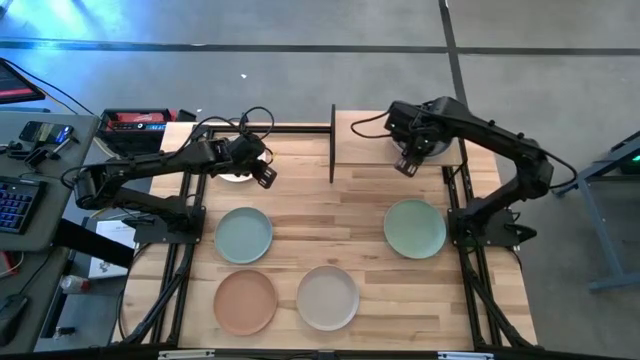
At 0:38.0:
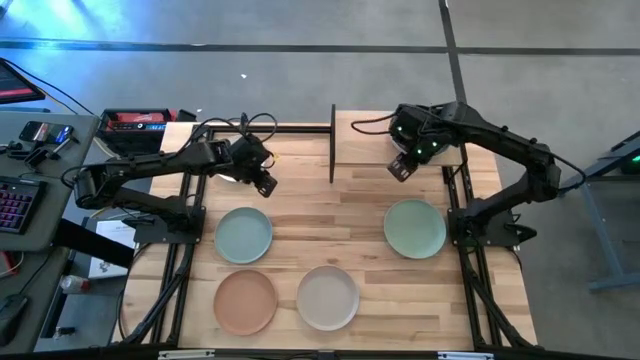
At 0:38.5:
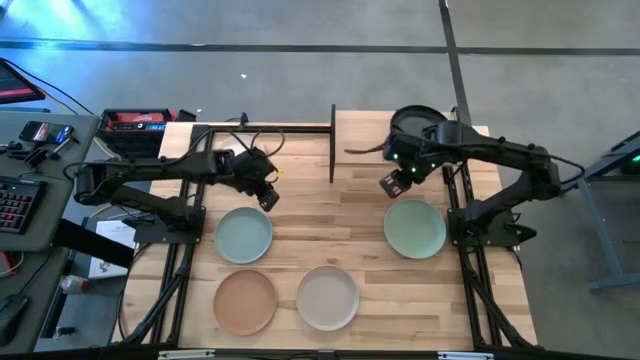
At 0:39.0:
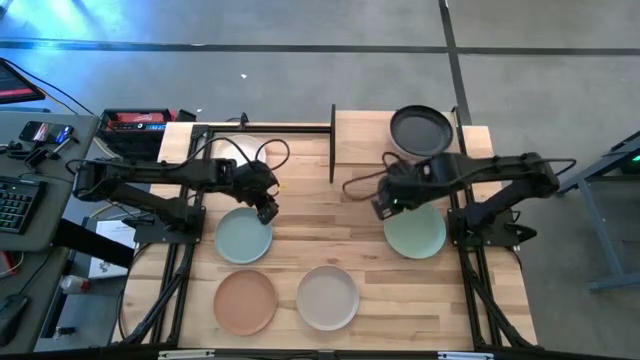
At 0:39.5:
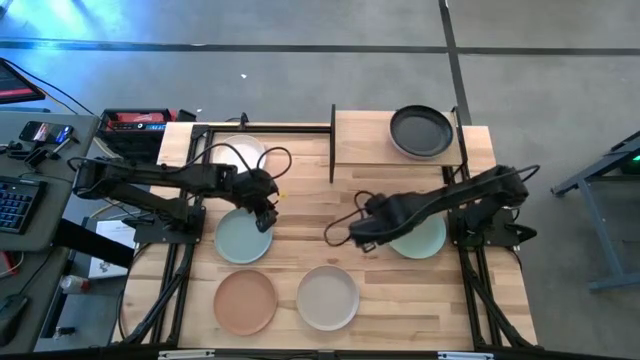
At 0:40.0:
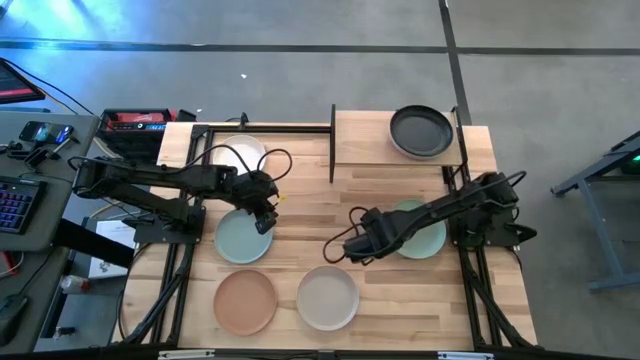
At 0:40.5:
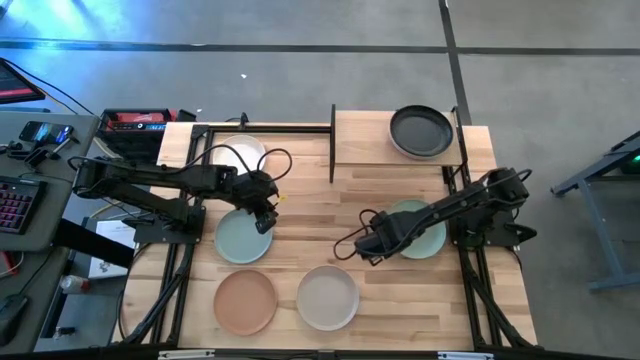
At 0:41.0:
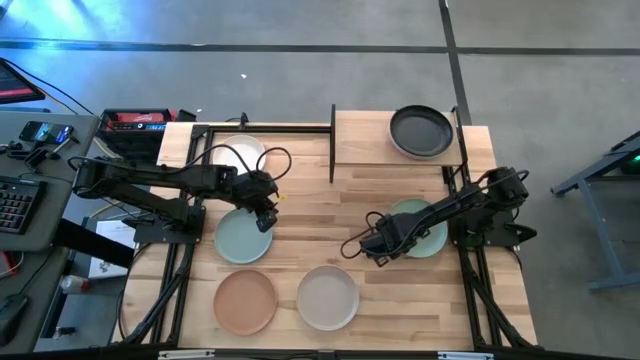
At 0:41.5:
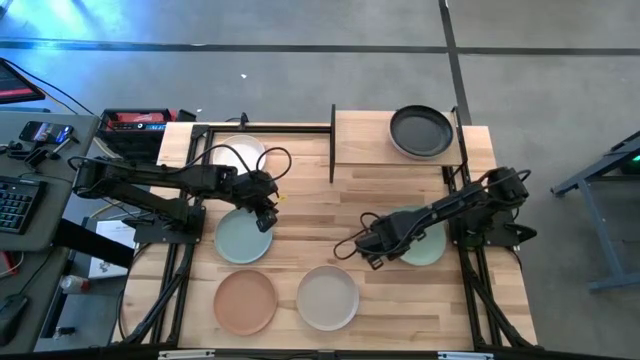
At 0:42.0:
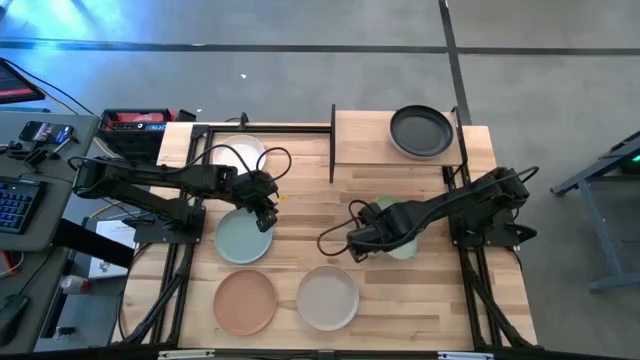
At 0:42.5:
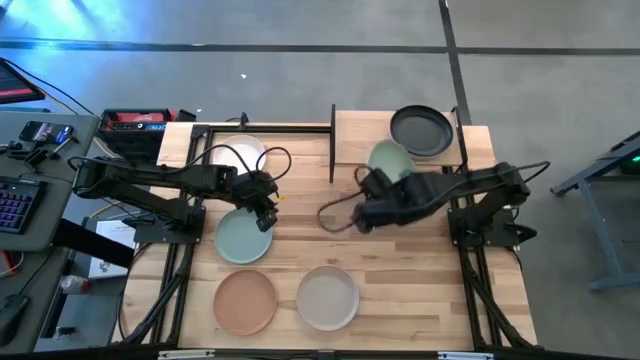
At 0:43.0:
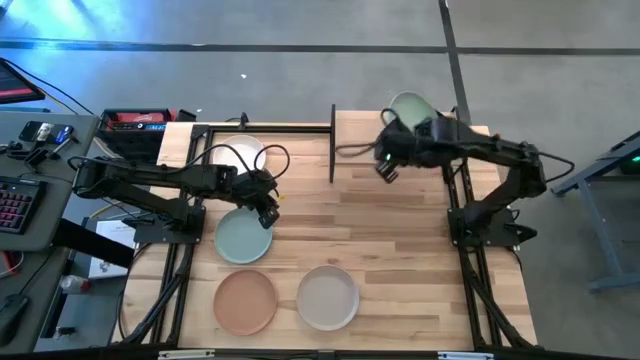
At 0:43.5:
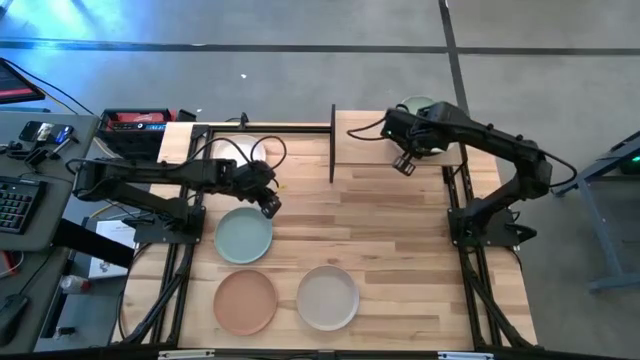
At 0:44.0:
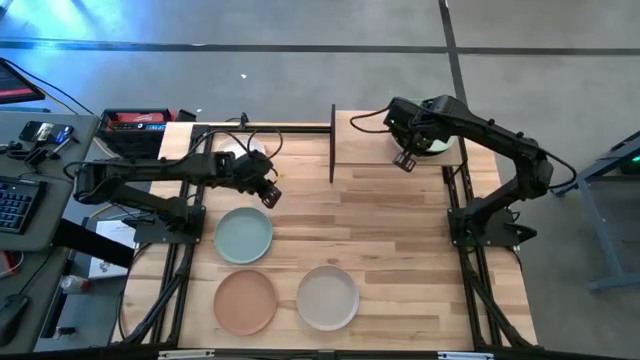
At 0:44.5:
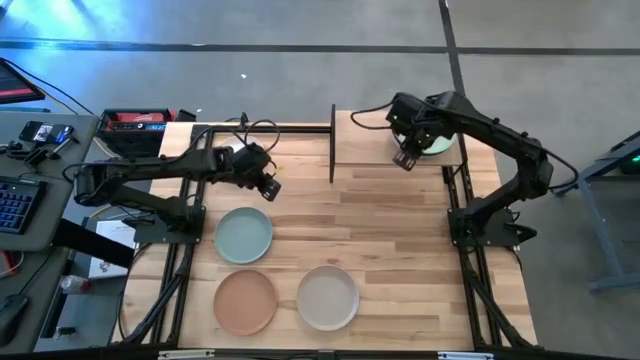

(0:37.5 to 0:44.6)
Task: Place and stack plates onto a shelf
Stack the green plate on top of the black plate on the shelf

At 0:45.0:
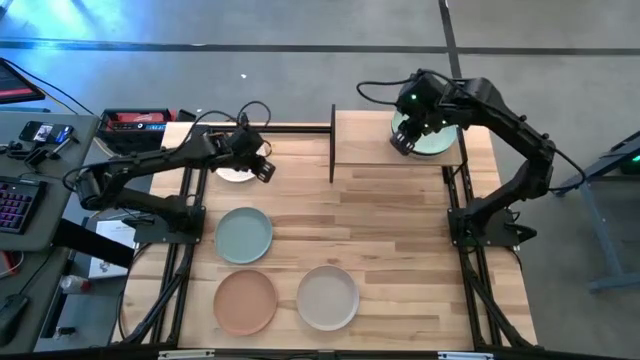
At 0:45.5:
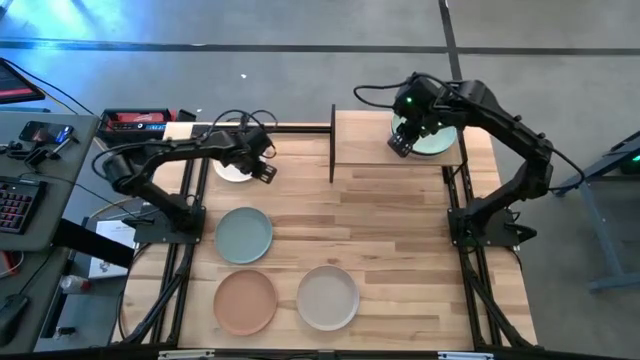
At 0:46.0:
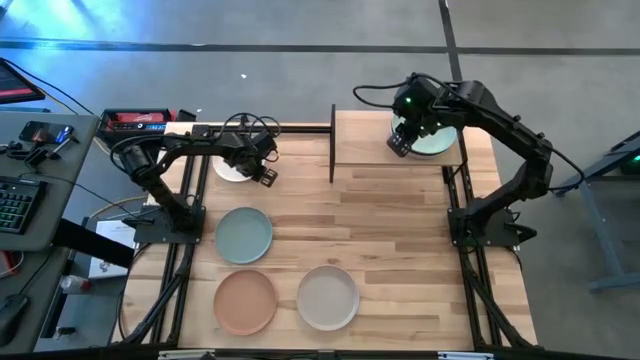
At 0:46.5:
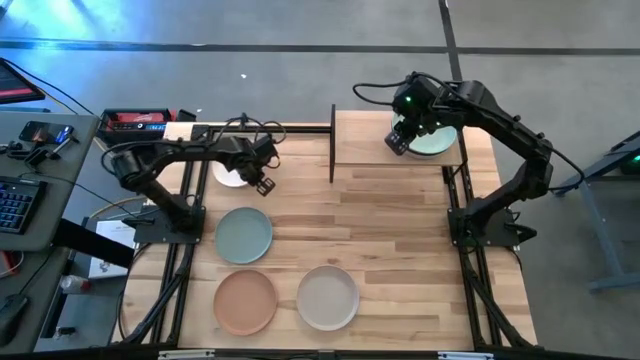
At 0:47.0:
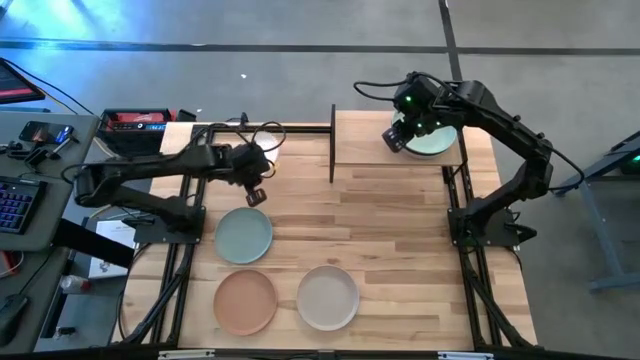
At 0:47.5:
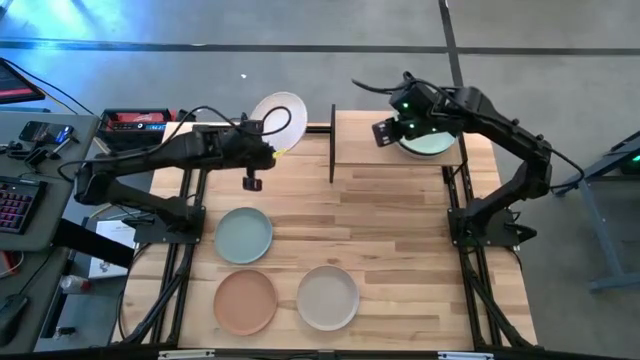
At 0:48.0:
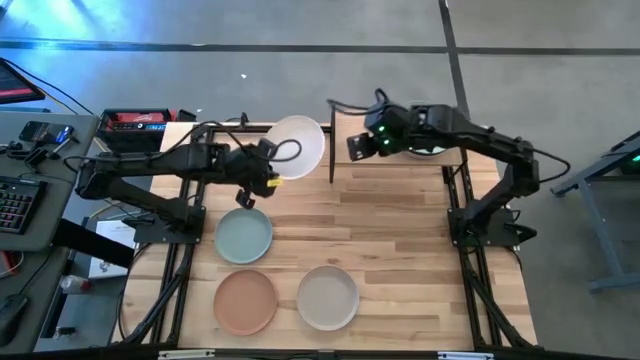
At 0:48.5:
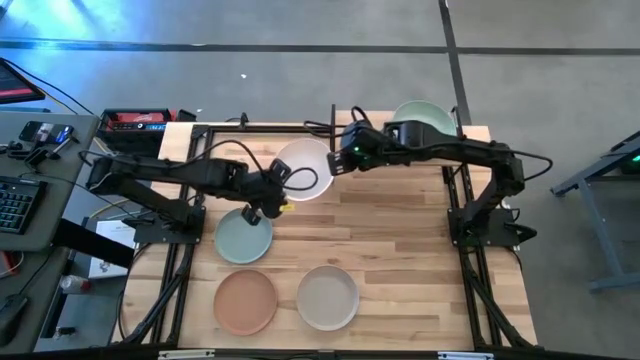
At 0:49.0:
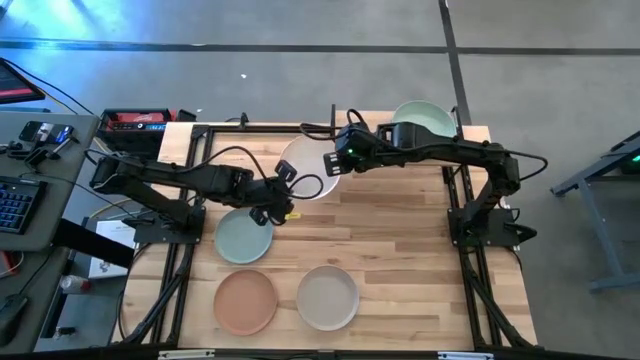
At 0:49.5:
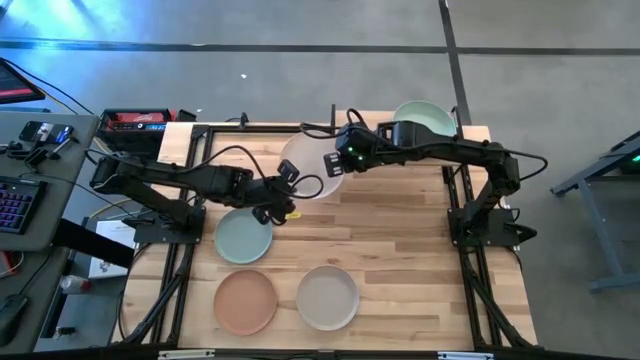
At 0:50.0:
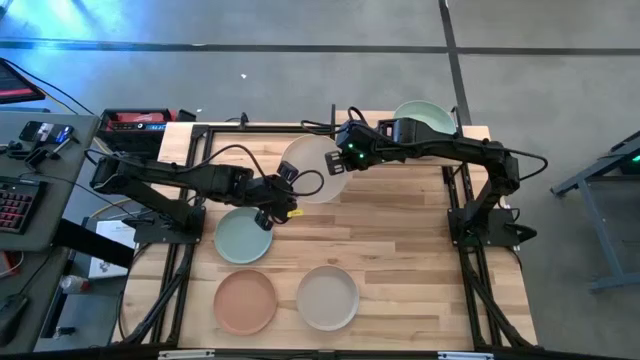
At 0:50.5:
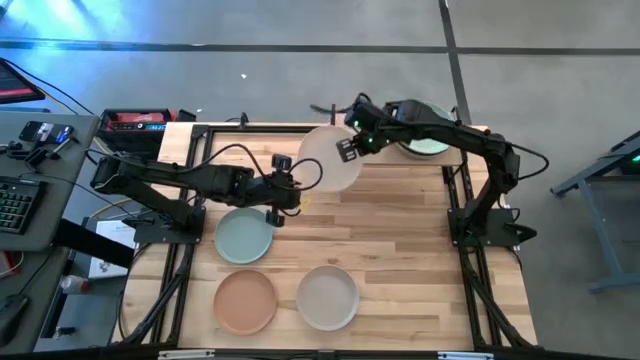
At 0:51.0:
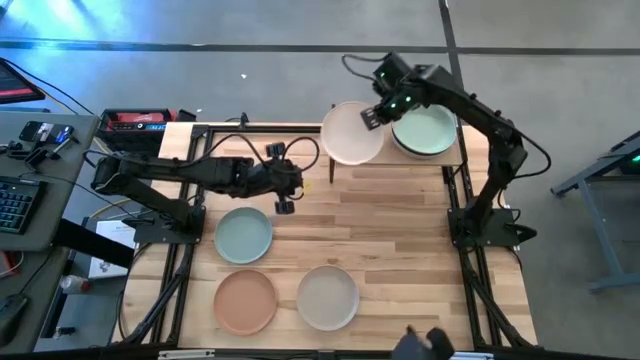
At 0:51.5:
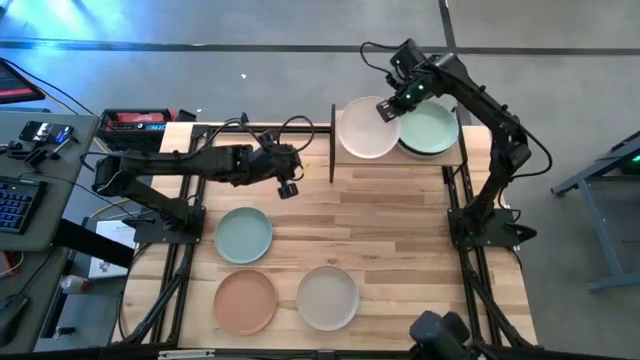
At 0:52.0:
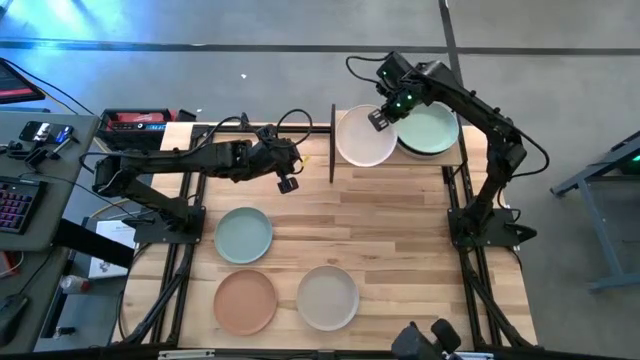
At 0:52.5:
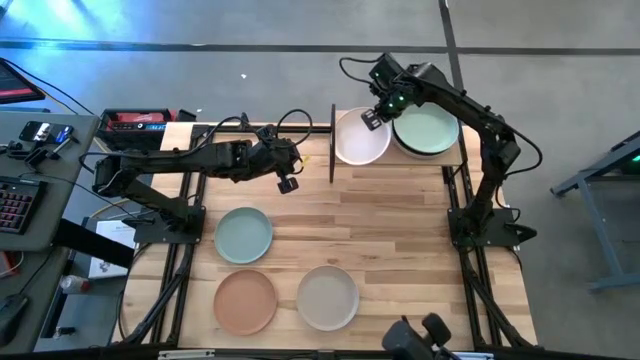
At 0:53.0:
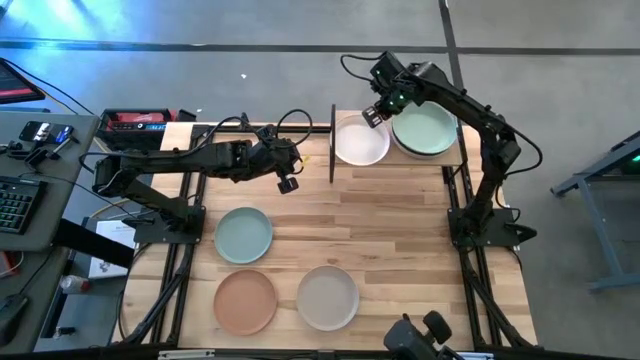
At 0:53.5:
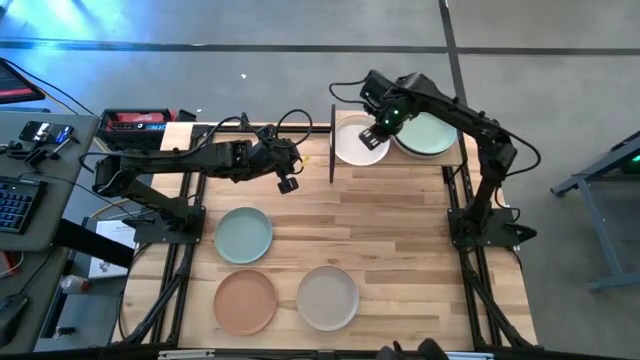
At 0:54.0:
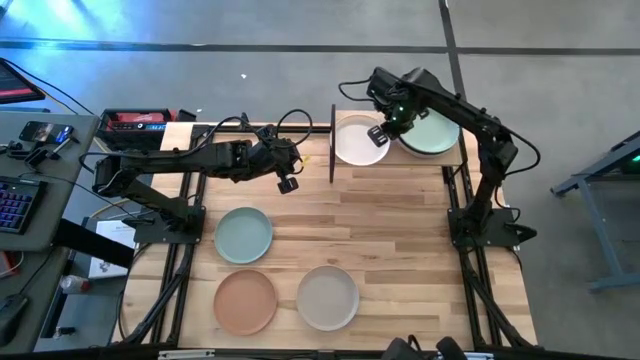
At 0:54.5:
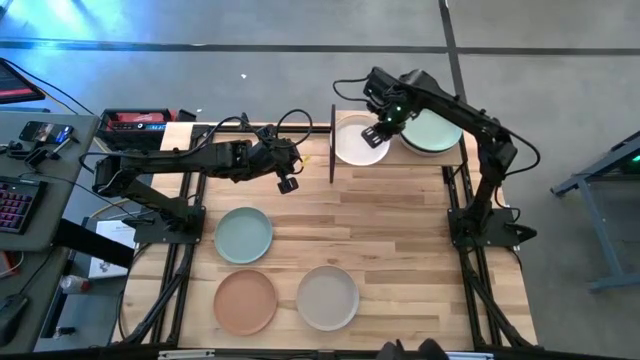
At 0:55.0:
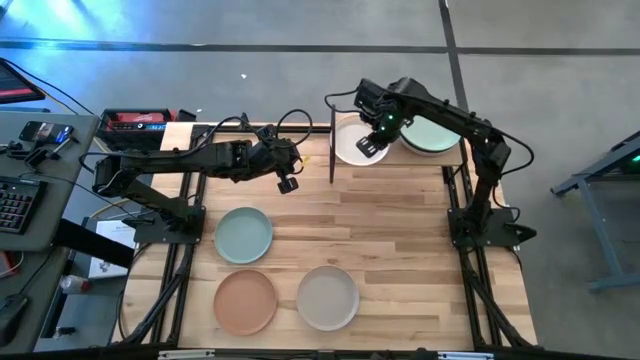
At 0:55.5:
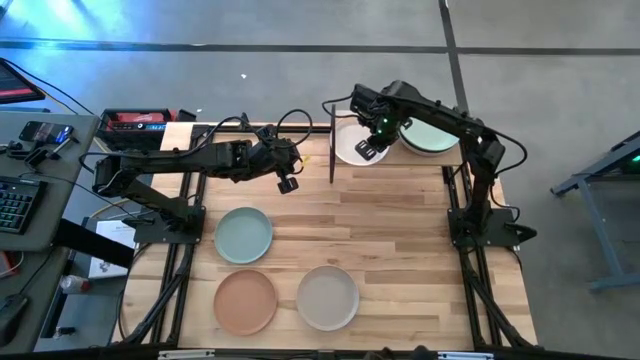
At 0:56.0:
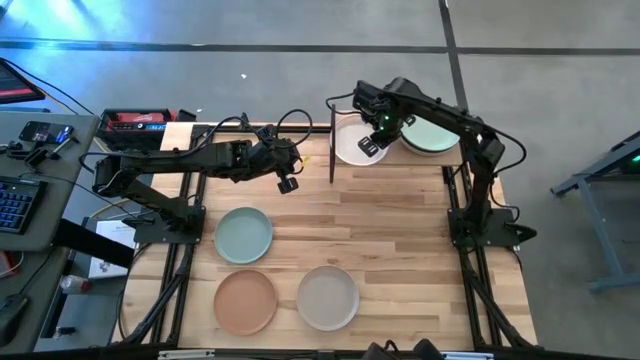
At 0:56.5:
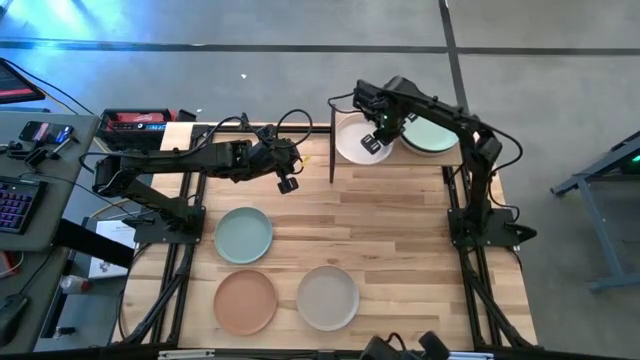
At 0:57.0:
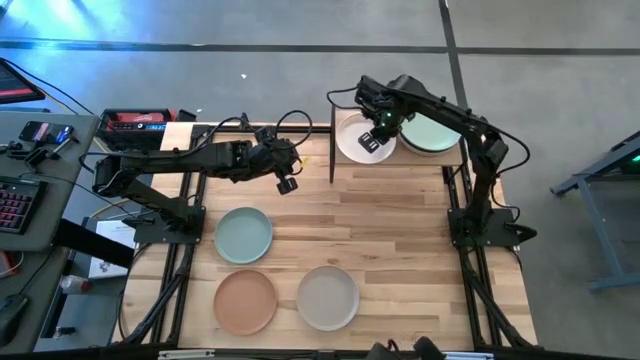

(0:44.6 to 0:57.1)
Put the white plate on the shelf

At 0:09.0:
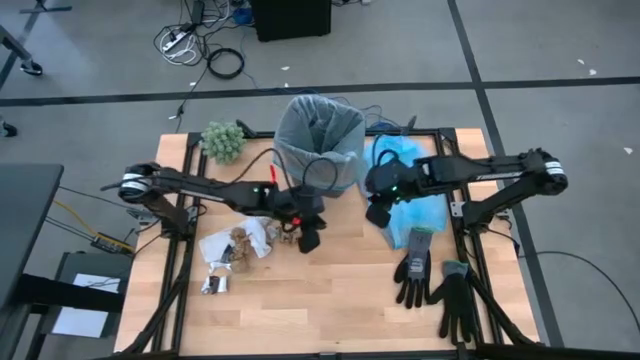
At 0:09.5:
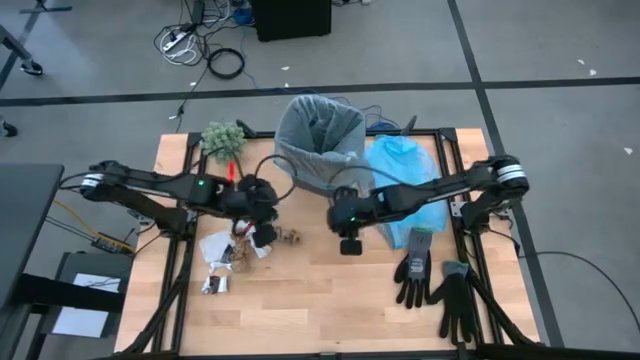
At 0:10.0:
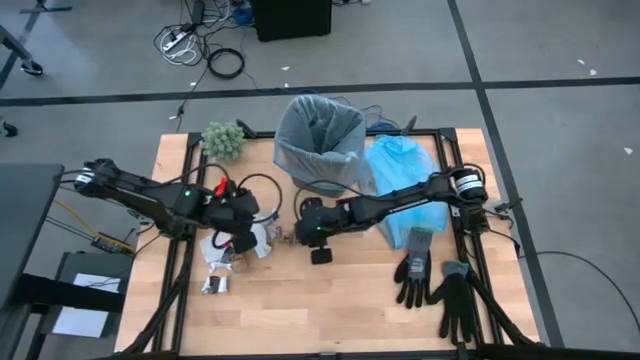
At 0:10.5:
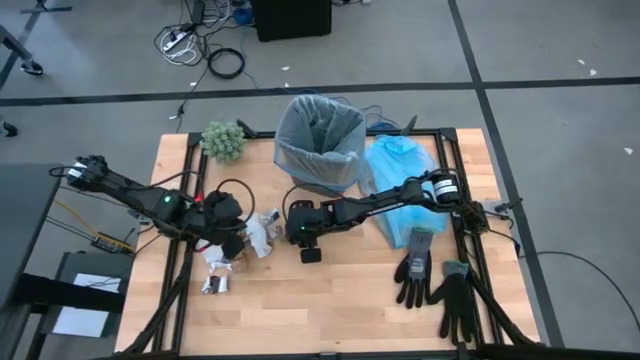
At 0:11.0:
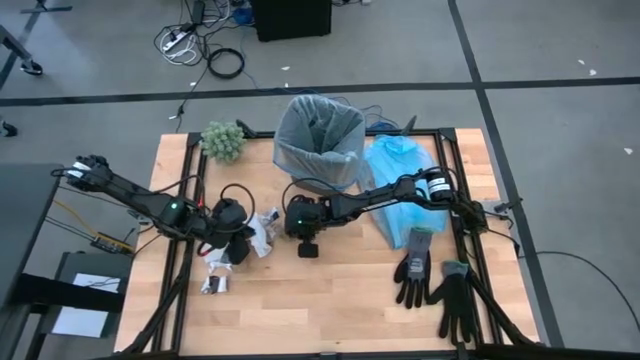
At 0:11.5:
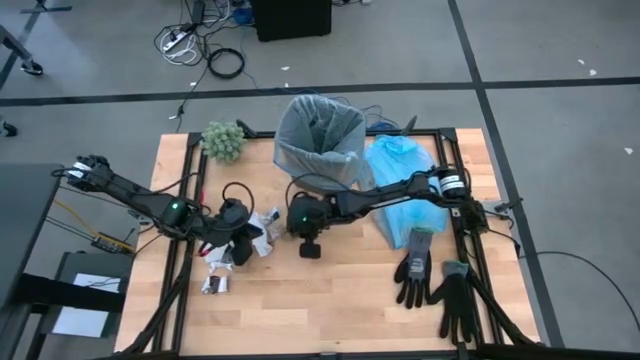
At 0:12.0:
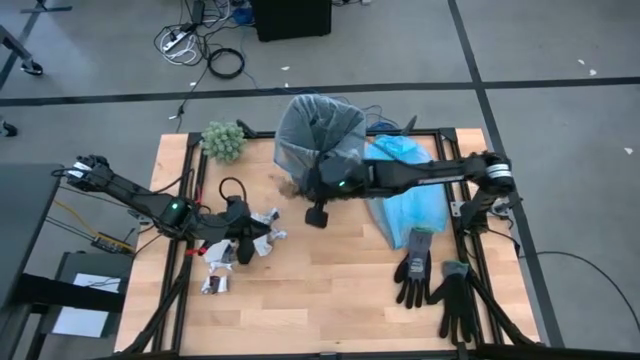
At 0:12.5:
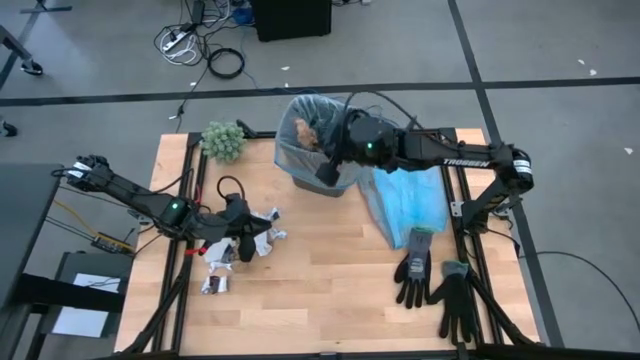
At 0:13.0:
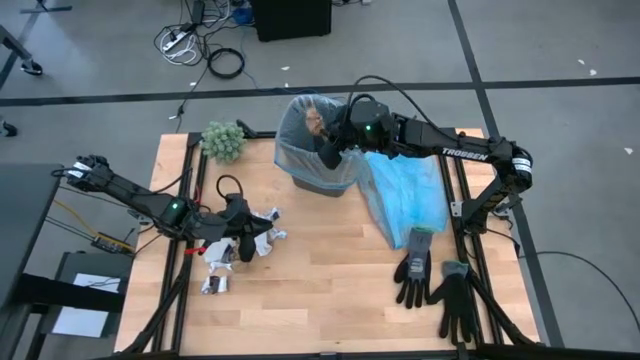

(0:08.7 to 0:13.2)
Task: place trash/remove bag and relplace
Put the brown napkin into the trash bin
